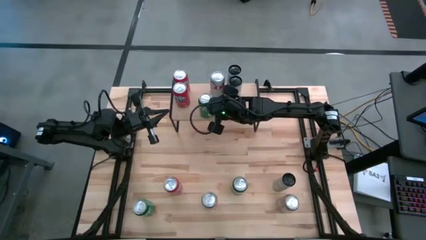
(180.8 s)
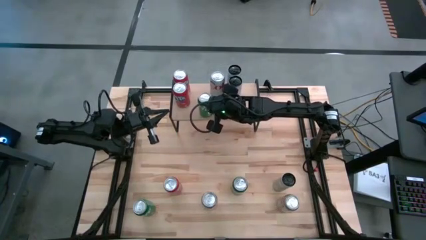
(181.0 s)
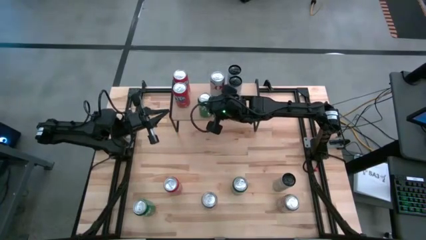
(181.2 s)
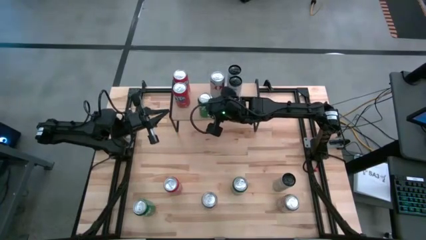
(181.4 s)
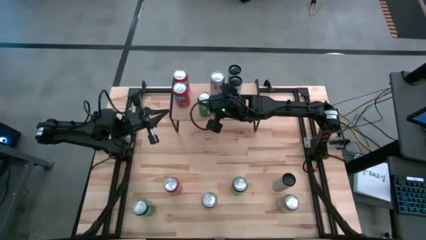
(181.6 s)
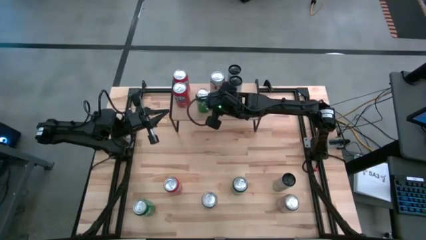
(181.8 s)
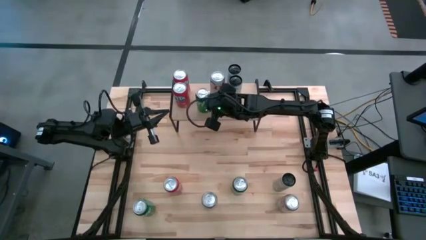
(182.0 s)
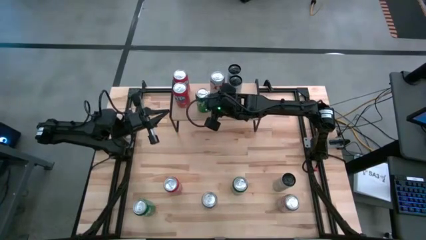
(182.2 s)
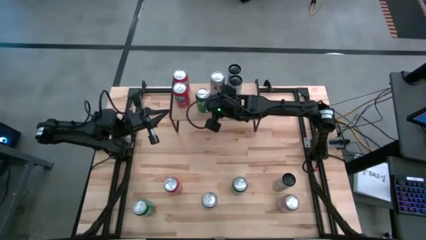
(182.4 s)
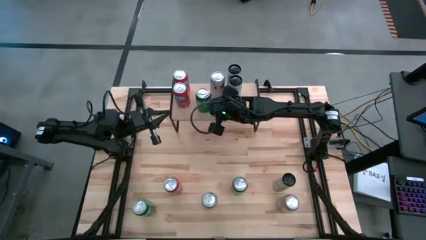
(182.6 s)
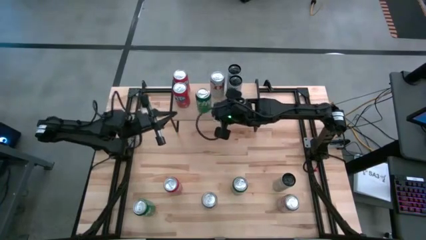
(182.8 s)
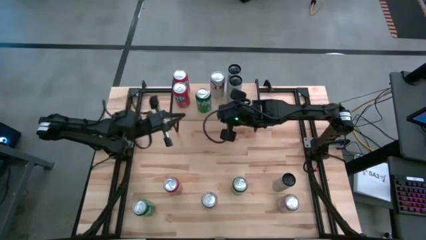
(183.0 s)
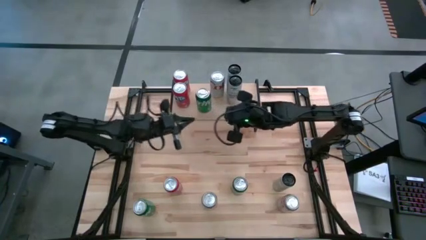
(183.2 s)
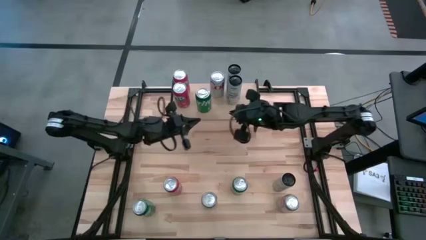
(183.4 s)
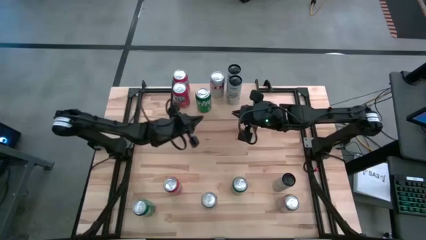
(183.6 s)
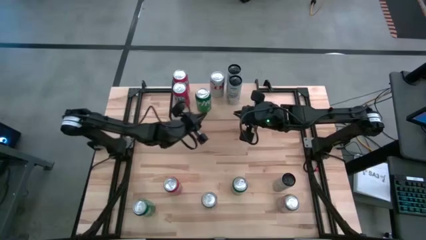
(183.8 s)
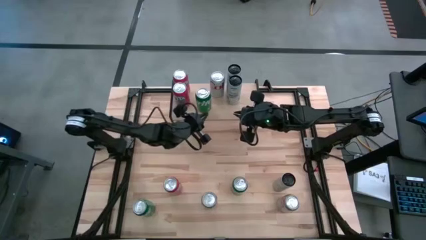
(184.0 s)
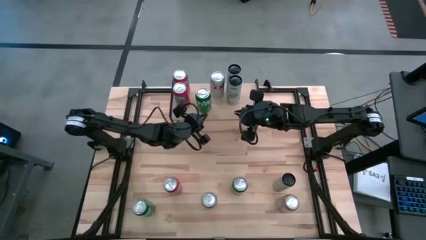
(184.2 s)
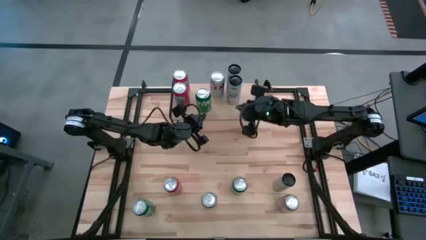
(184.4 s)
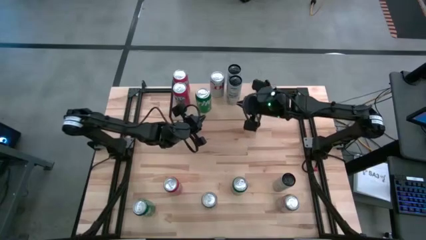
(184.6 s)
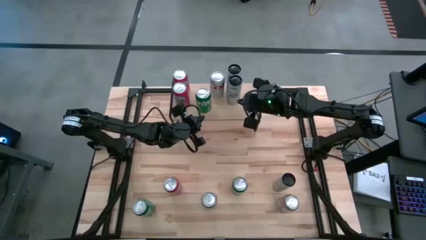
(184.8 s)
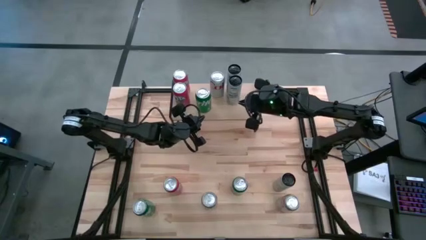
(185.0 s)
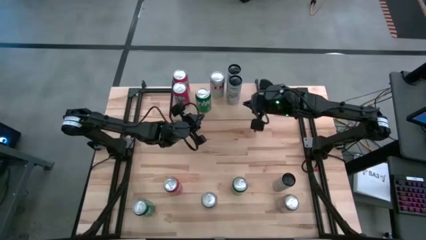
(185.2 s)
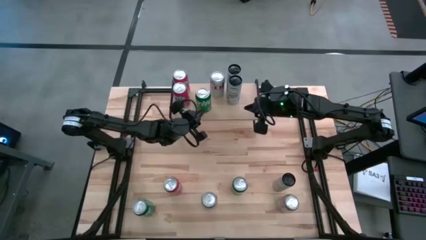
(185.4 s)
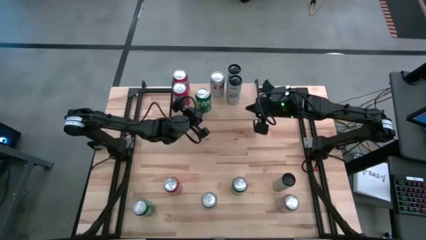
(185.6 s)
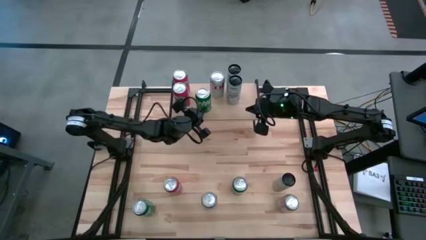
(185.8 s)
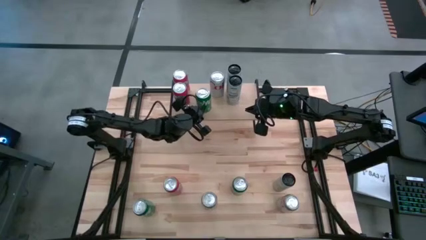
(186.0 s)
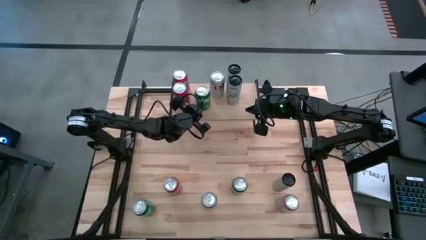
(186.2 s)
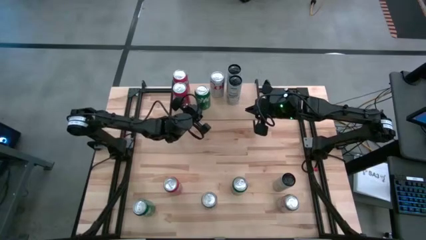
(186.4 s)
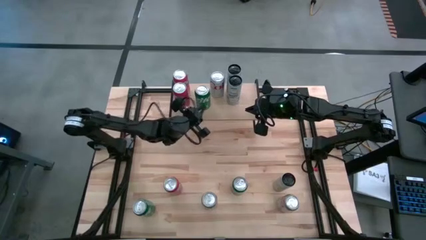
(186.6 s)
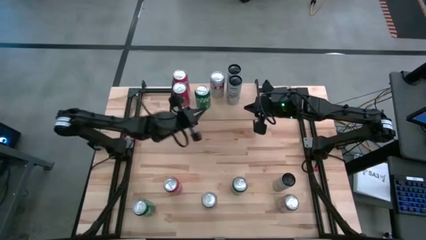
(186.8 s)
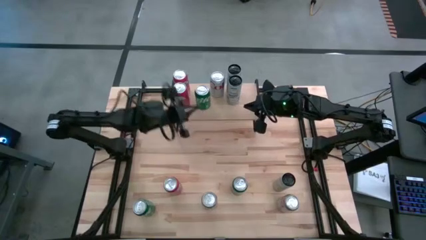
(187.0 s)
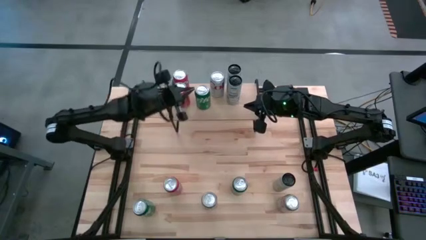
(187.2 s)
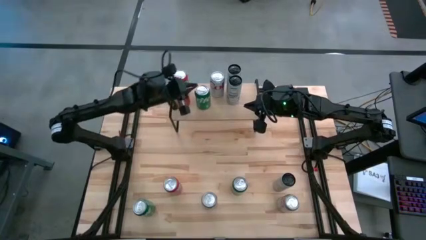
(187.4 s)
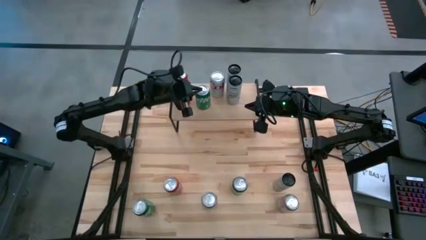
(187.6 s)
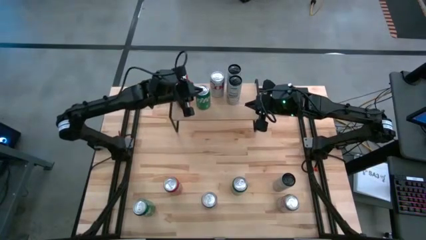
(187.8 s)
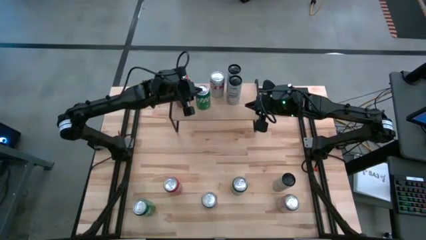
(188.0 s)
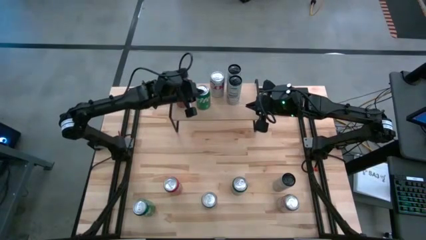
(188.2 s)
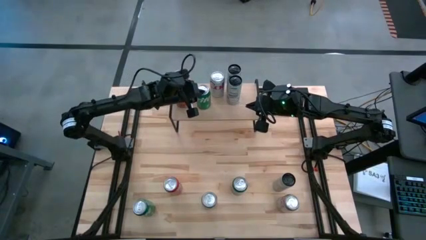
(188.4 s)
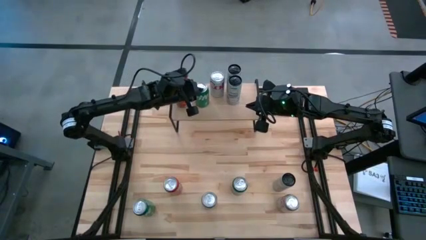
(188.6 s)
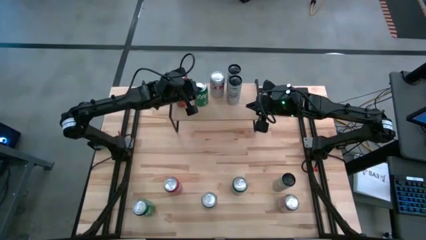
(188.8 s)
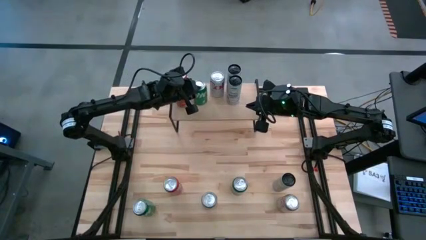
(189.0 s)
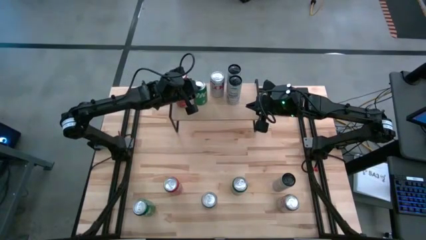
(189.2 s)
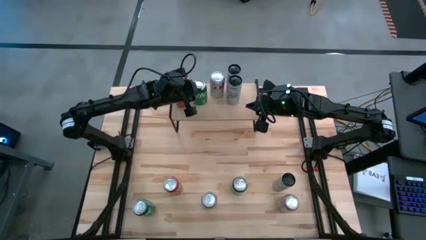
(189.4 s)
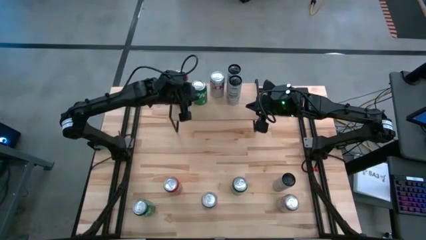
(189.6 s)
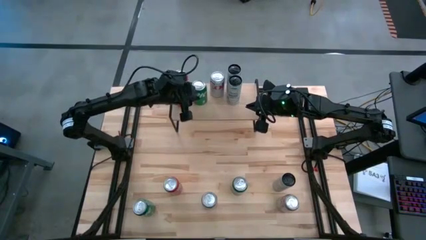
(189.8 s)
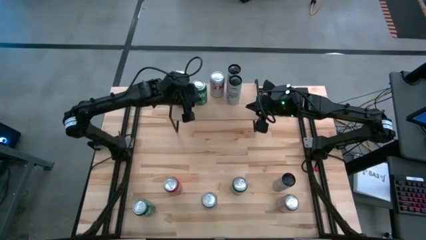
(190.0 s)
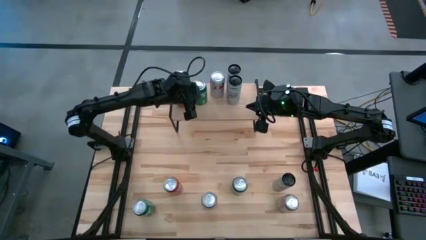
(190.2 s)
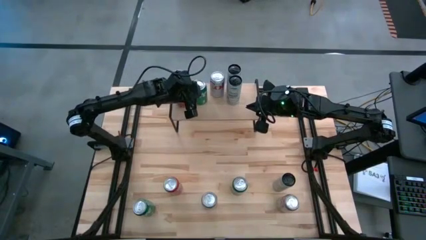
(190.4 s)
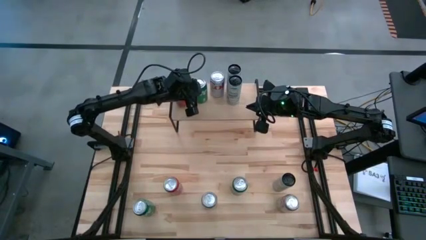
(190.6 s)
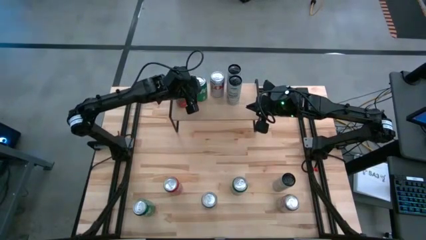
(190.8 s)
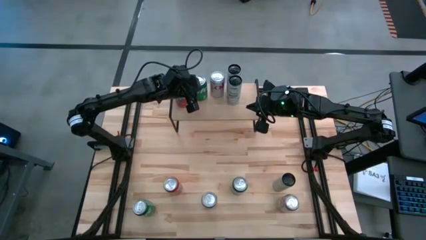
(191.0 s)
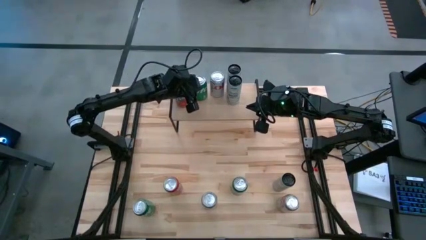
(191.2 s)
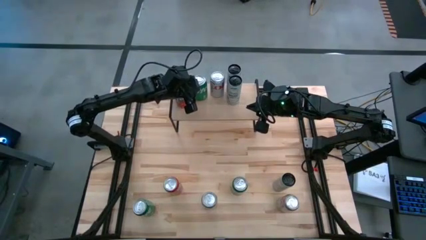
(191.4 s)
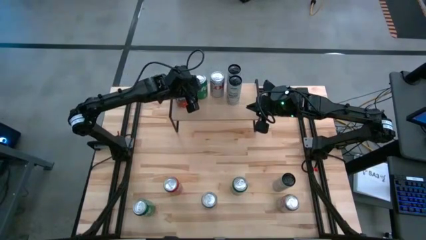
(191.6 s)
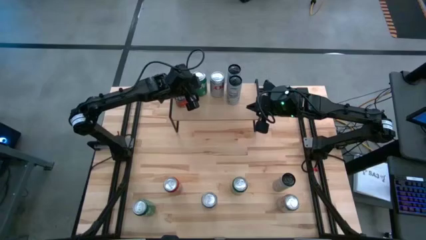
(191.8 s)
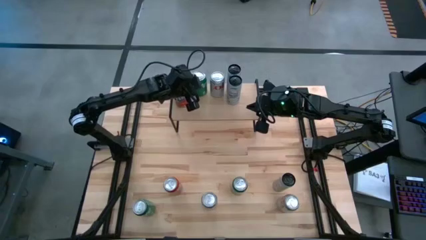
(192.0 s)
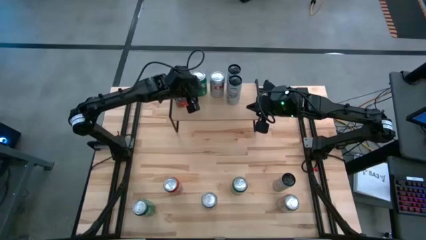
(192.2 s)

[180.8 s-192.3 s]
Task: Place canned beverage on shelf
Put the top green soda can on the shelf

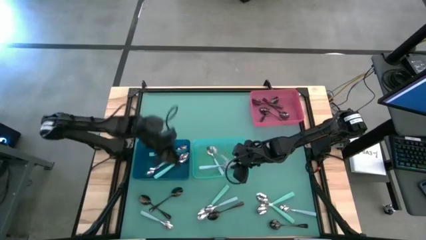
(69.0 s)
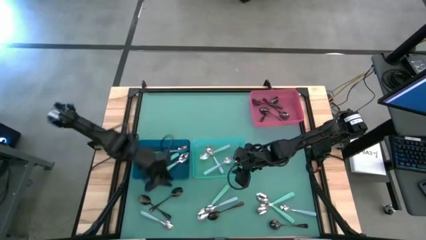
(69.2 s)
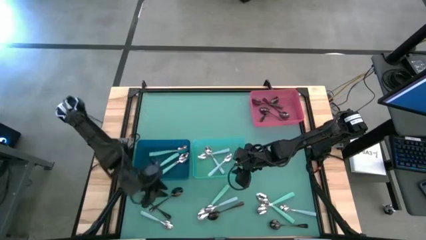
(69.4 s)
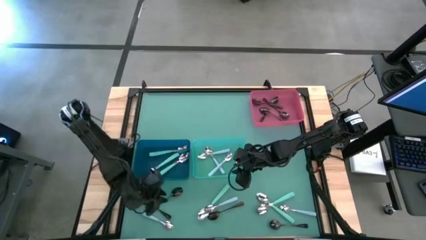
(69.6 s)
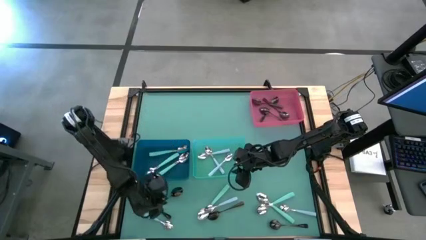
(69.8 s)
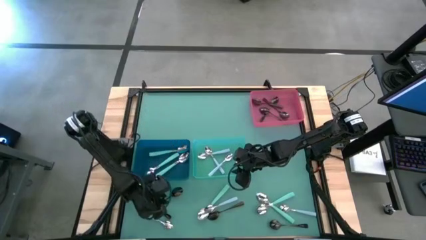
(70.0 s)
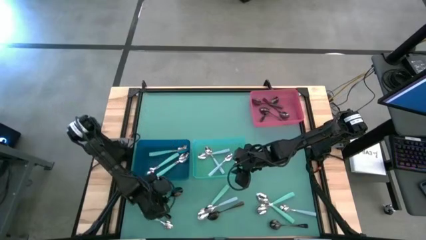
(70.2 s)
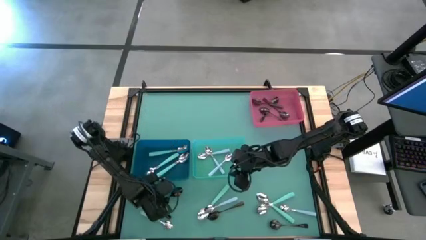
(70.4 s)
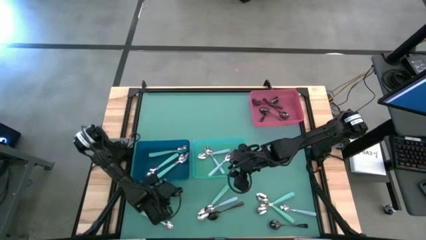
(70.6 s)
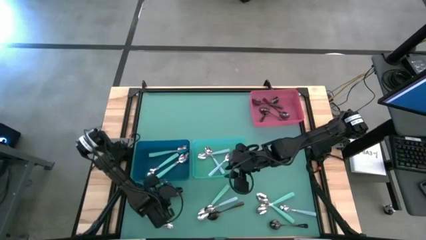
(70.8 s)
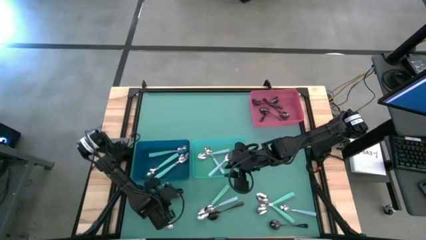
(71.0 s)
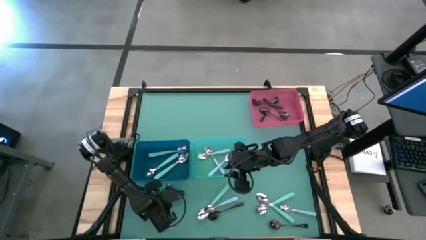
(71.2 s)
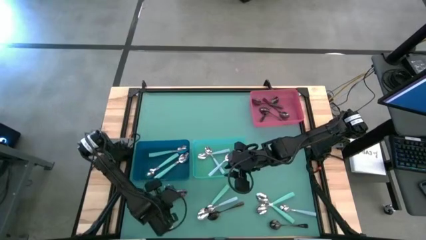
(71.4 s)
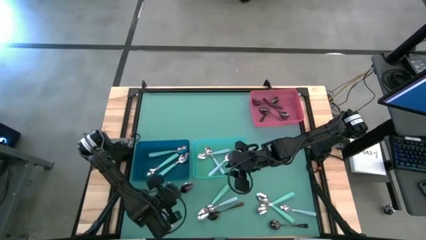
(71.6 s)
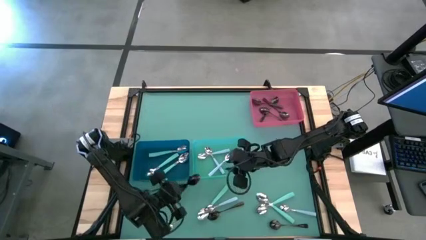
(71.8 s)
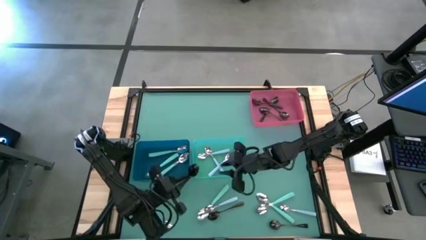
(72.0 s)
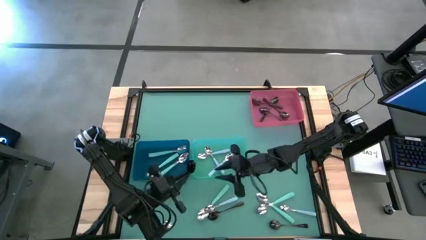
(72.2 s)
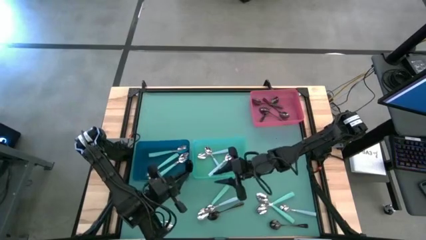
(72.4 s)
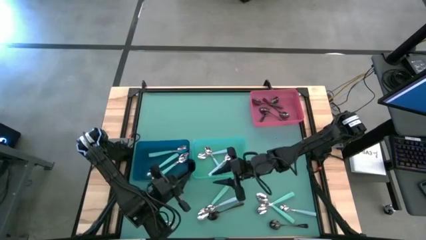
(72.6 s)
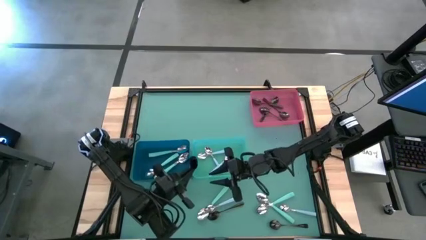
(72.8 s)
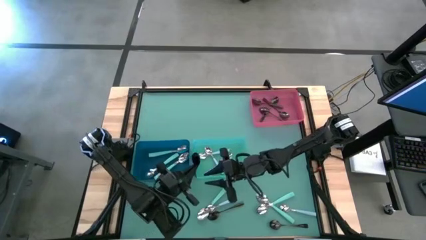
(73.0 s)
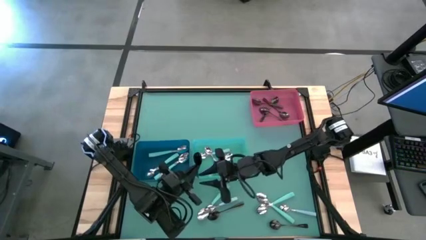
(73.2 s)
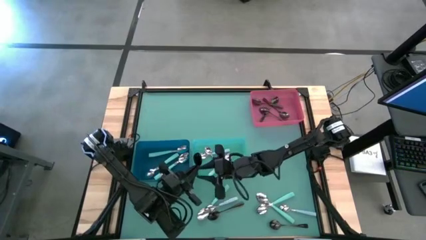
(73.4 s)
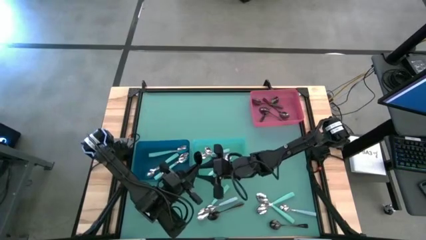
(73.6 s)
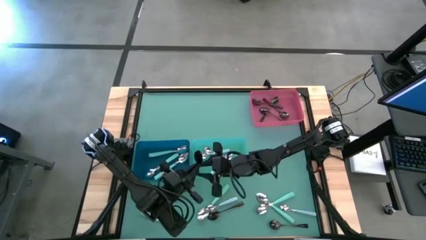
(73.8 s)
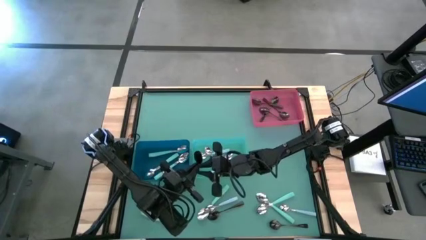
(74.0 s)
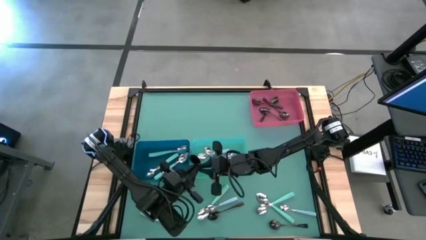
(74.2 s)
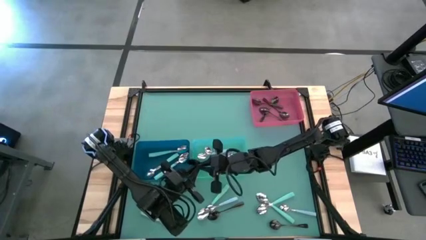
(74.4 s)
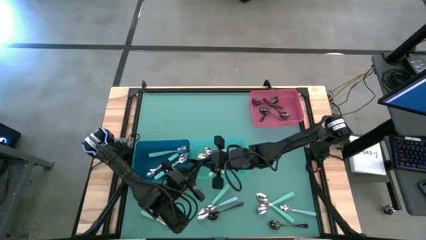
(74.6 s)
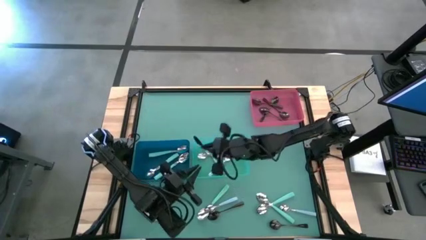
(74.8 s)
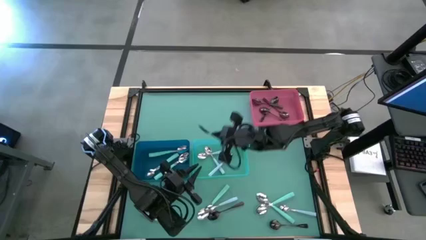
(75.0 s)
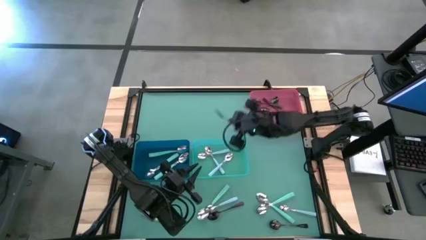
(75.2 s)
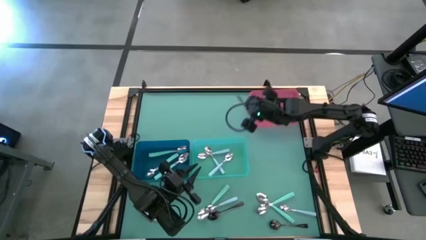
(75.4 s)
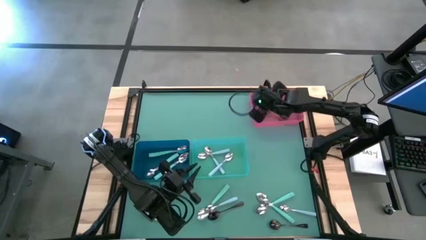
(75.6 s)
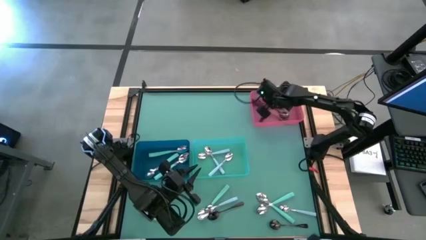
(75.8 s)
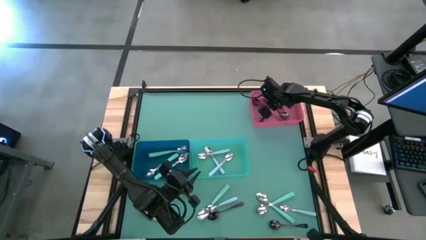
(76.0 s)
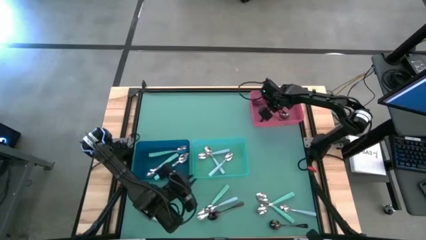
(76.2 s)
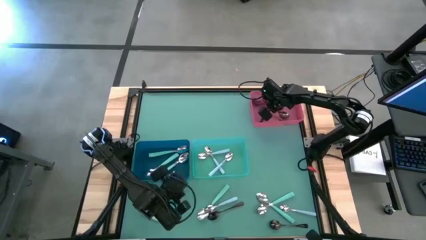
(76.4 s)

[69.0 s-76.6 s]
Task: Sort silverware by color (type)
Put the black spoon into the pink bin
